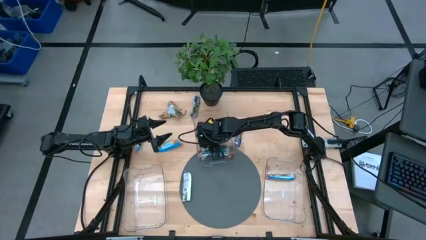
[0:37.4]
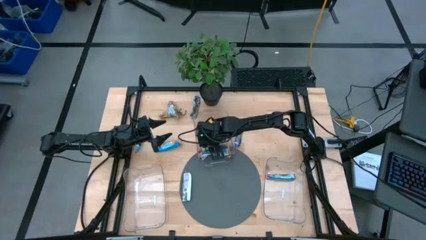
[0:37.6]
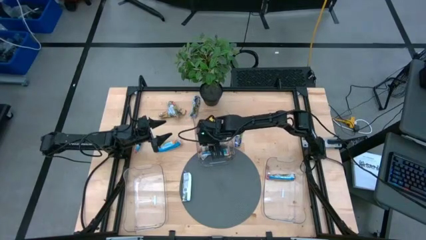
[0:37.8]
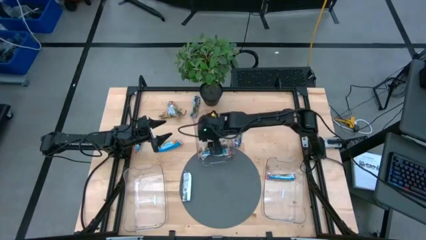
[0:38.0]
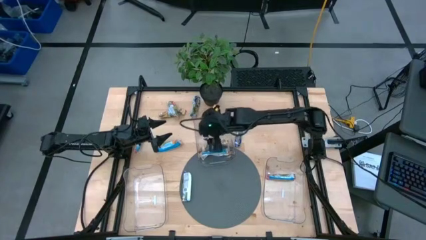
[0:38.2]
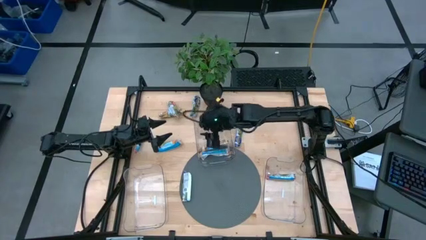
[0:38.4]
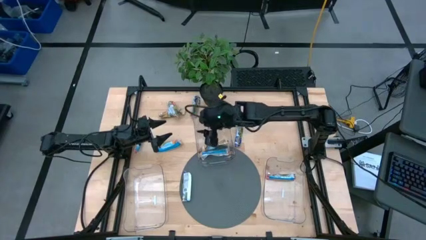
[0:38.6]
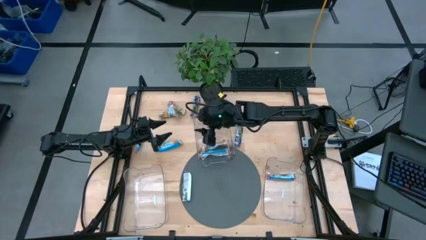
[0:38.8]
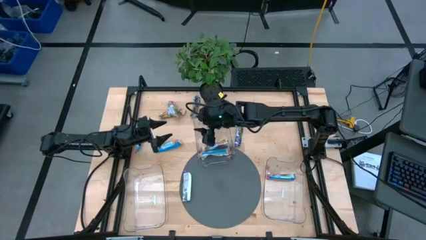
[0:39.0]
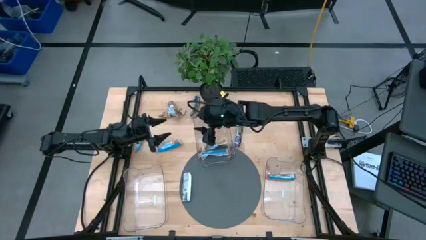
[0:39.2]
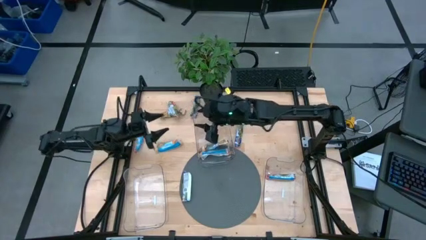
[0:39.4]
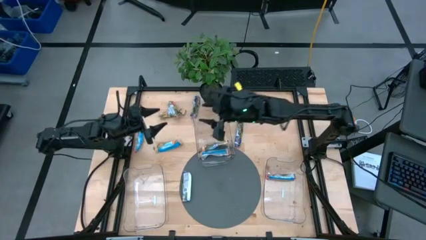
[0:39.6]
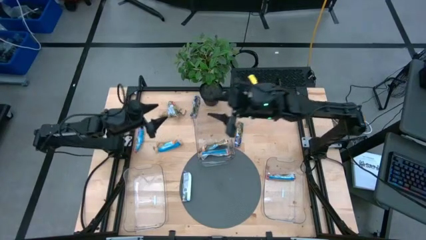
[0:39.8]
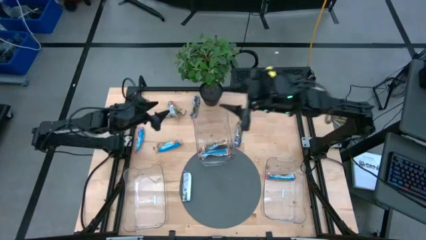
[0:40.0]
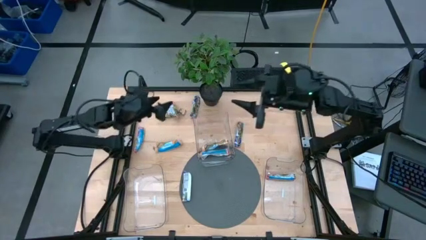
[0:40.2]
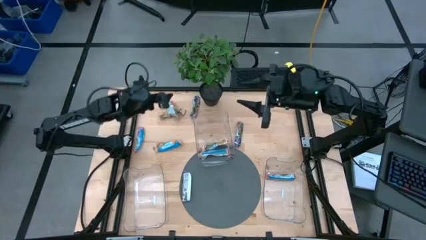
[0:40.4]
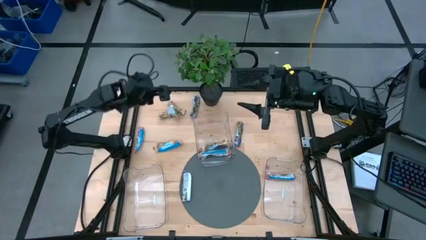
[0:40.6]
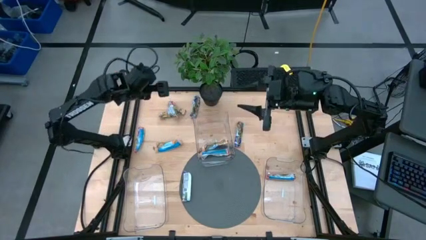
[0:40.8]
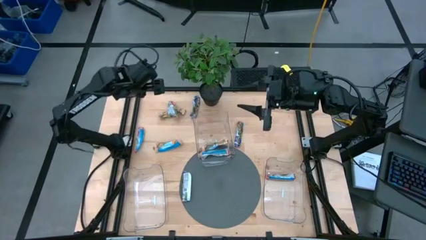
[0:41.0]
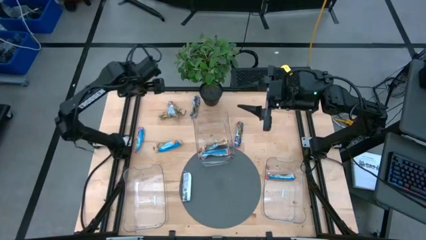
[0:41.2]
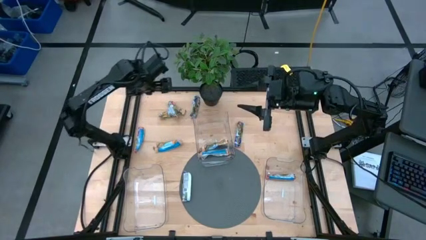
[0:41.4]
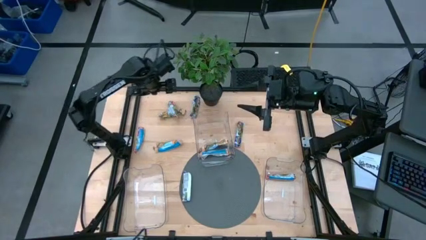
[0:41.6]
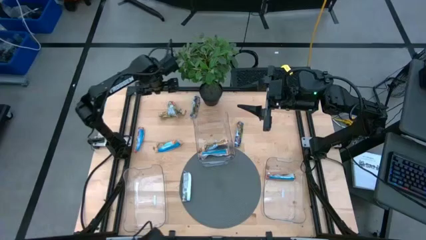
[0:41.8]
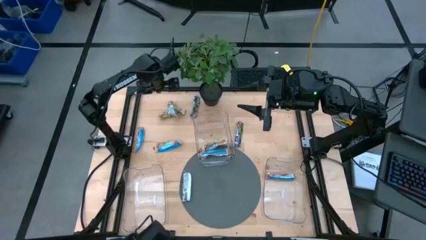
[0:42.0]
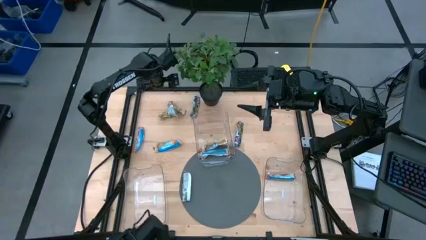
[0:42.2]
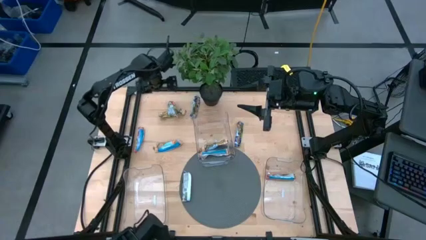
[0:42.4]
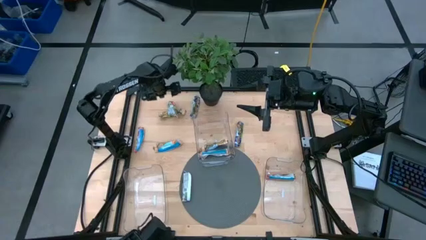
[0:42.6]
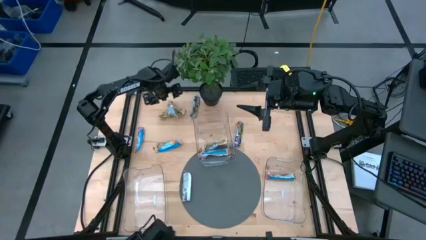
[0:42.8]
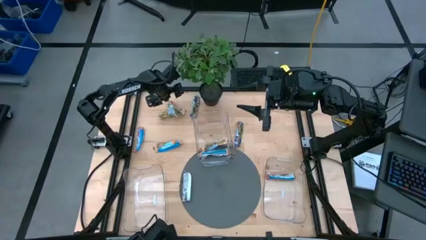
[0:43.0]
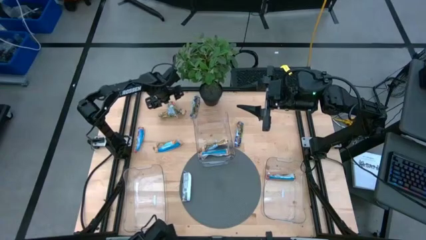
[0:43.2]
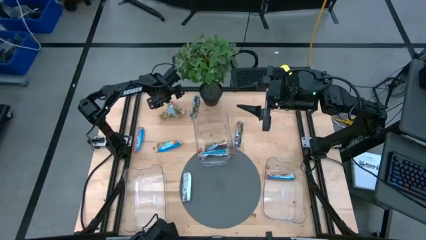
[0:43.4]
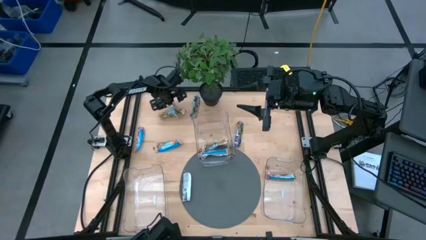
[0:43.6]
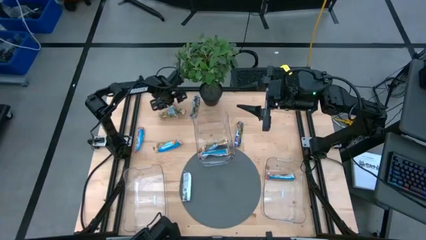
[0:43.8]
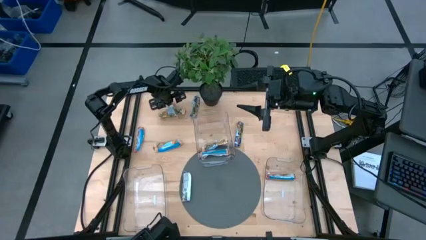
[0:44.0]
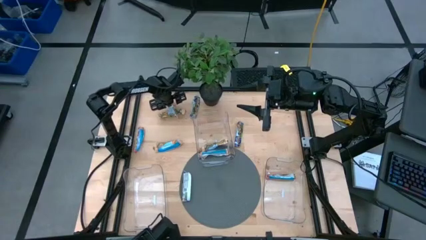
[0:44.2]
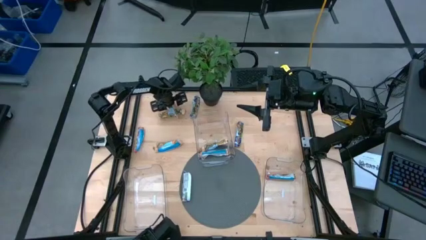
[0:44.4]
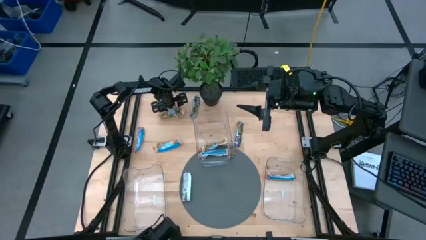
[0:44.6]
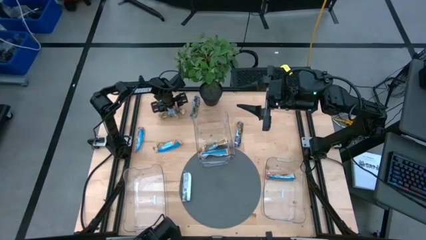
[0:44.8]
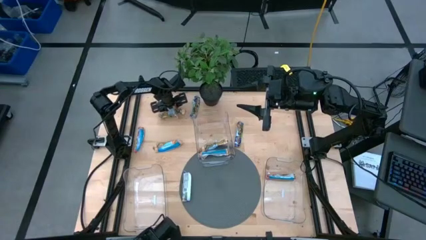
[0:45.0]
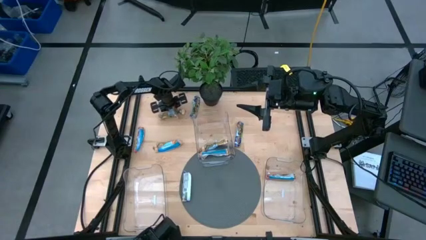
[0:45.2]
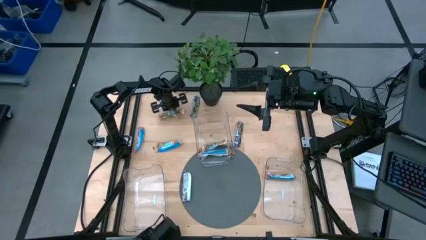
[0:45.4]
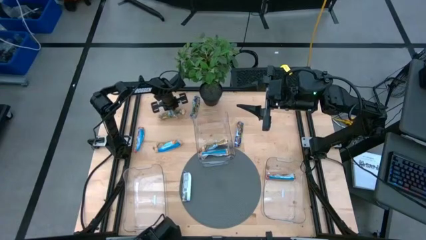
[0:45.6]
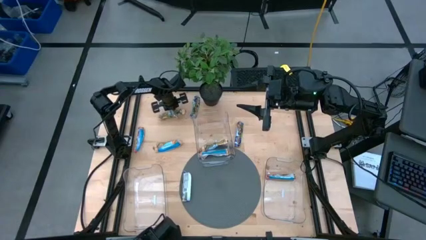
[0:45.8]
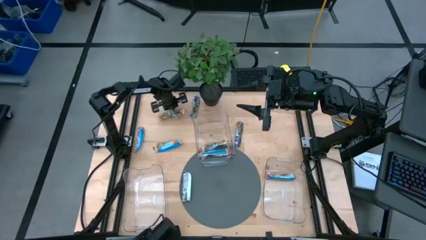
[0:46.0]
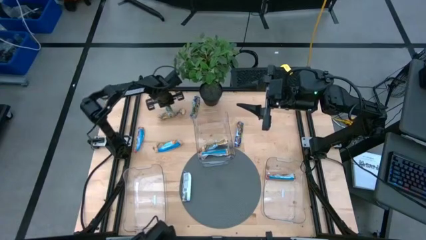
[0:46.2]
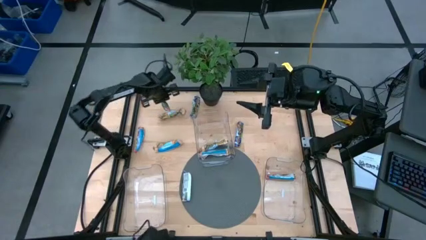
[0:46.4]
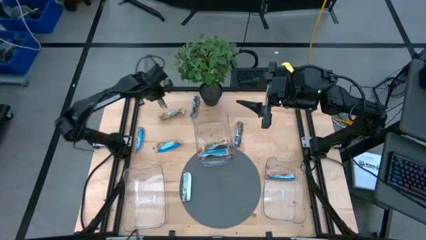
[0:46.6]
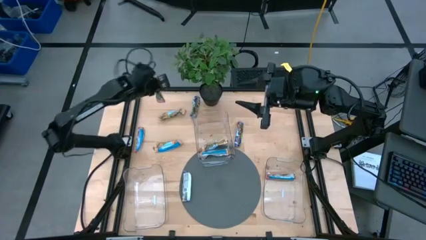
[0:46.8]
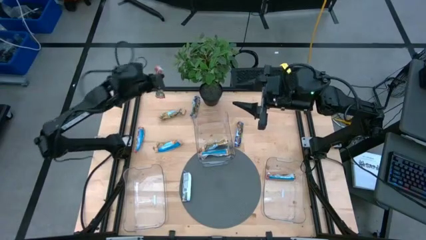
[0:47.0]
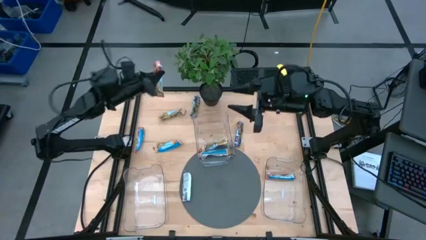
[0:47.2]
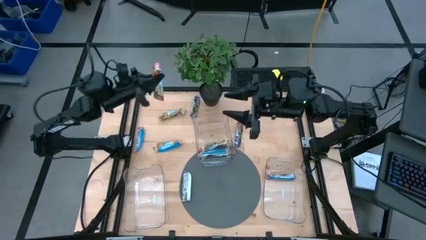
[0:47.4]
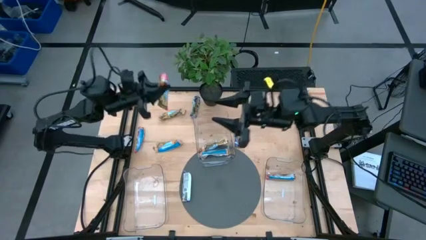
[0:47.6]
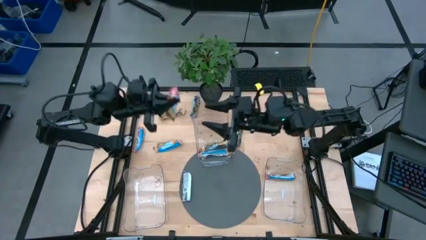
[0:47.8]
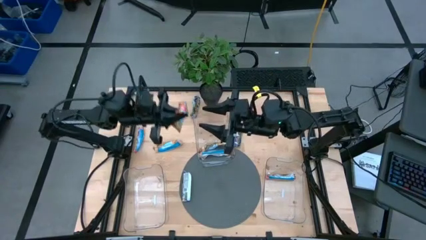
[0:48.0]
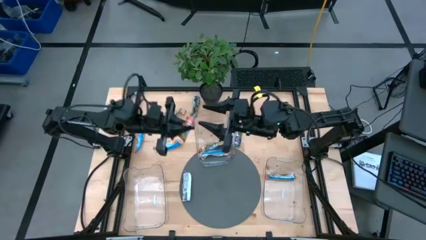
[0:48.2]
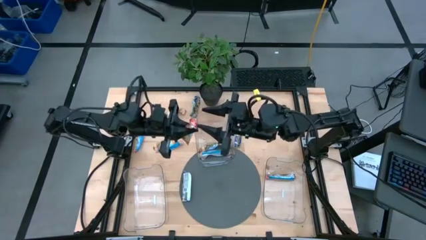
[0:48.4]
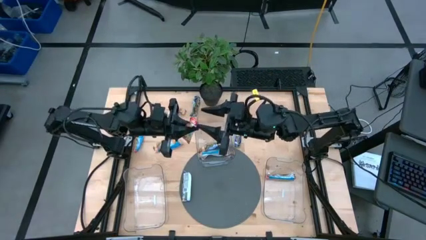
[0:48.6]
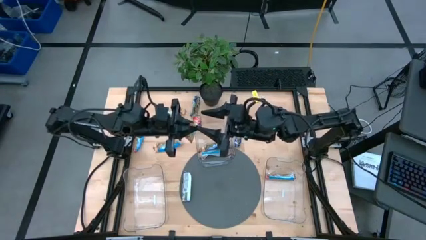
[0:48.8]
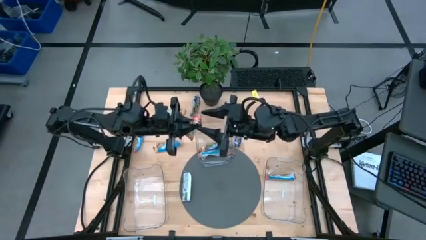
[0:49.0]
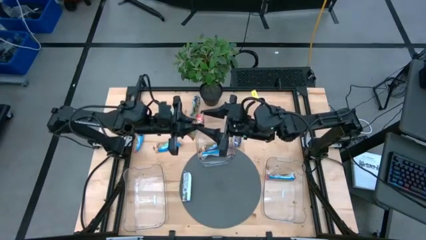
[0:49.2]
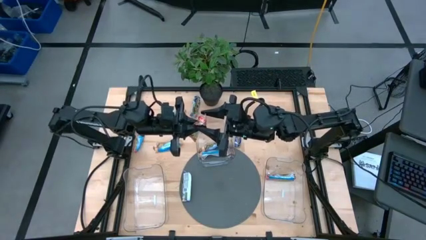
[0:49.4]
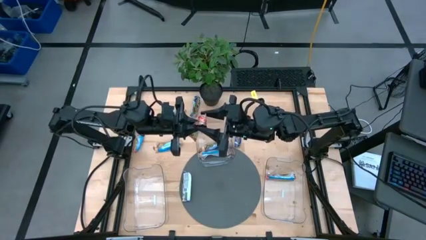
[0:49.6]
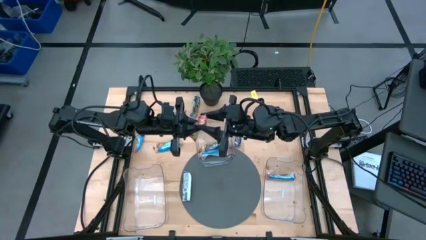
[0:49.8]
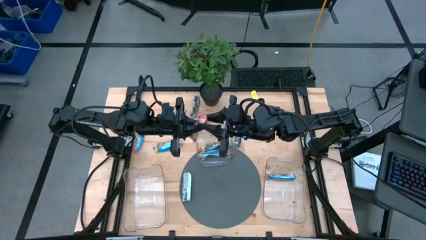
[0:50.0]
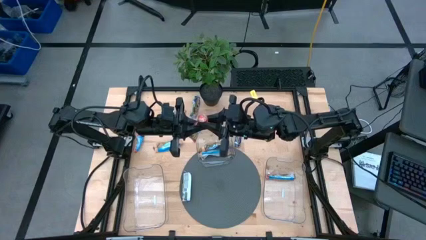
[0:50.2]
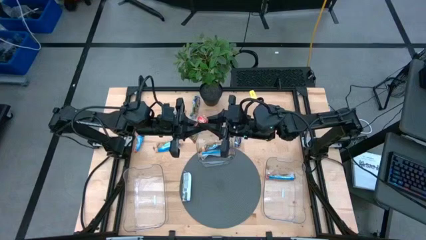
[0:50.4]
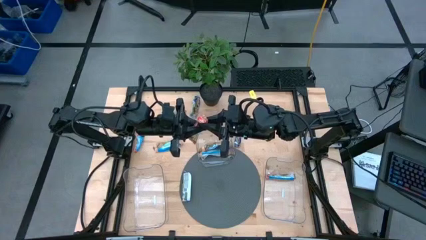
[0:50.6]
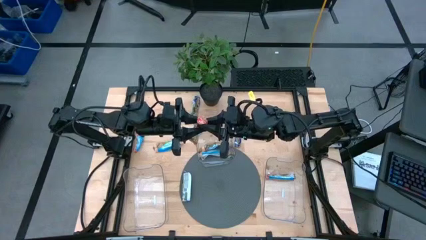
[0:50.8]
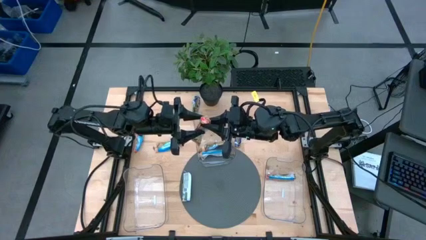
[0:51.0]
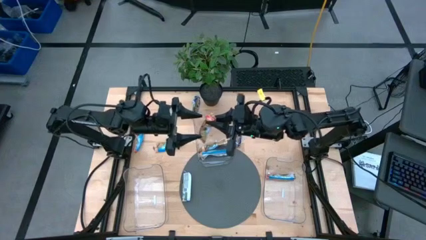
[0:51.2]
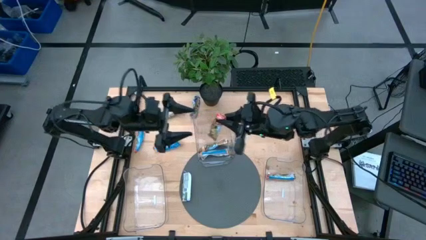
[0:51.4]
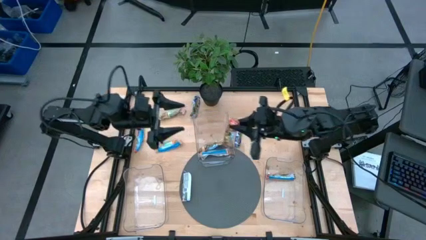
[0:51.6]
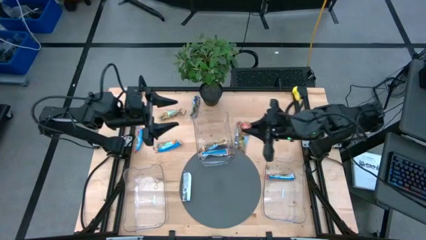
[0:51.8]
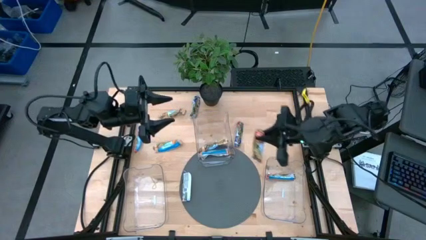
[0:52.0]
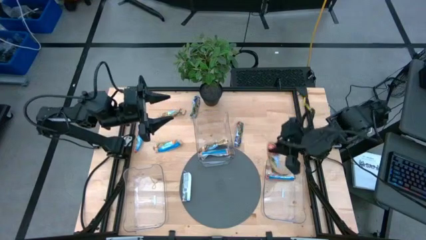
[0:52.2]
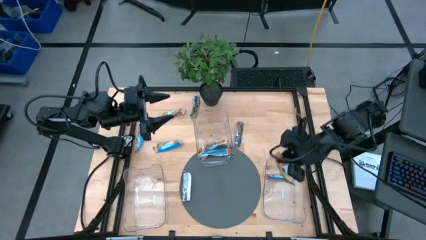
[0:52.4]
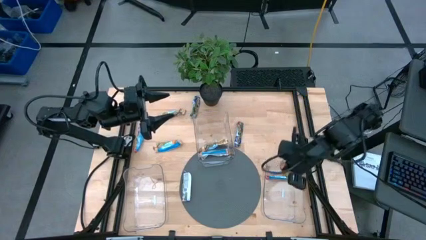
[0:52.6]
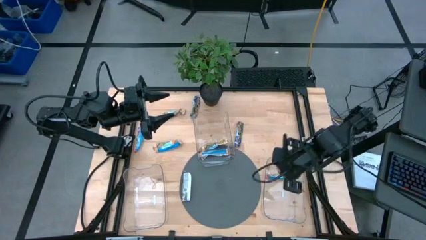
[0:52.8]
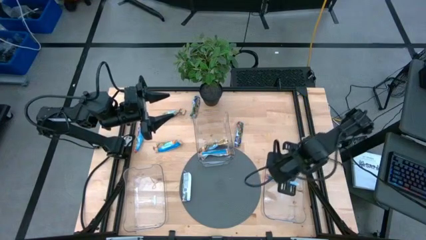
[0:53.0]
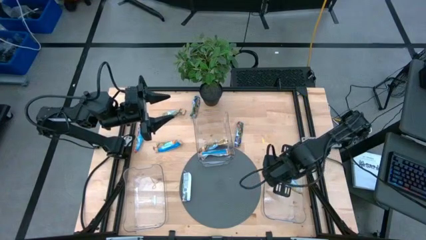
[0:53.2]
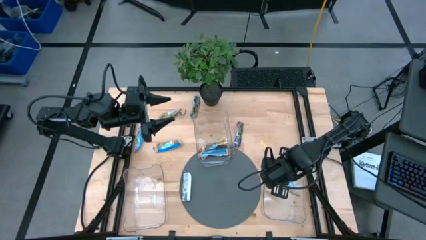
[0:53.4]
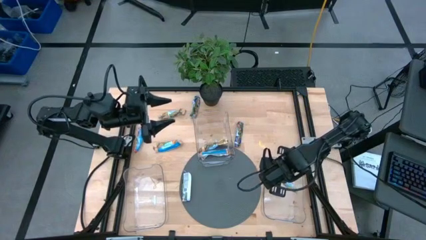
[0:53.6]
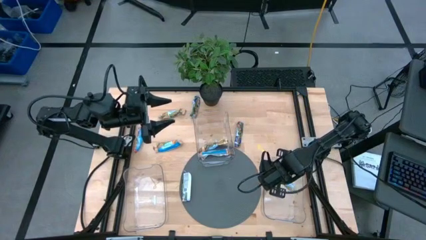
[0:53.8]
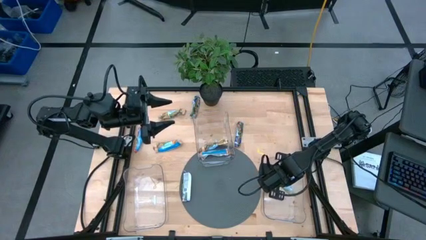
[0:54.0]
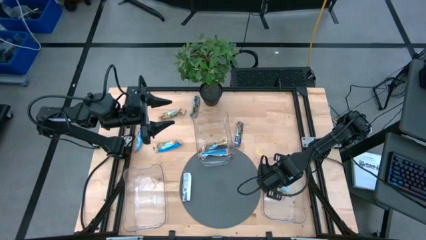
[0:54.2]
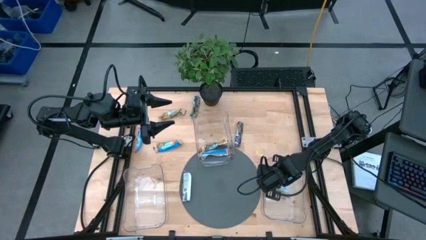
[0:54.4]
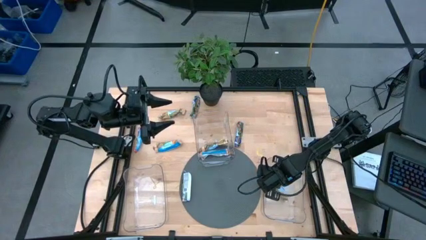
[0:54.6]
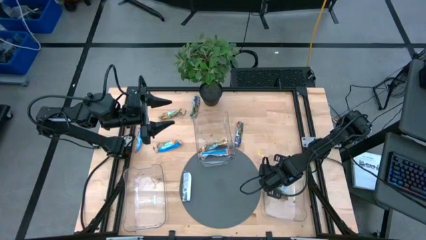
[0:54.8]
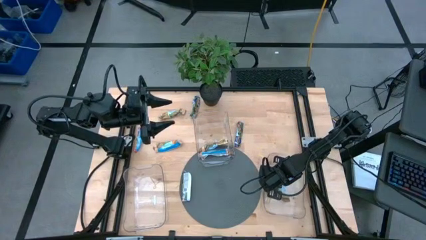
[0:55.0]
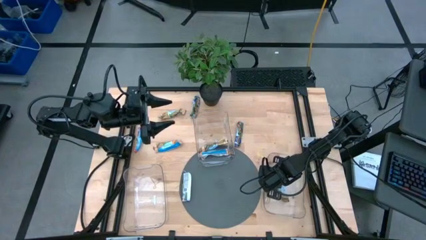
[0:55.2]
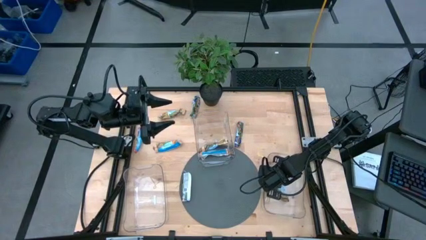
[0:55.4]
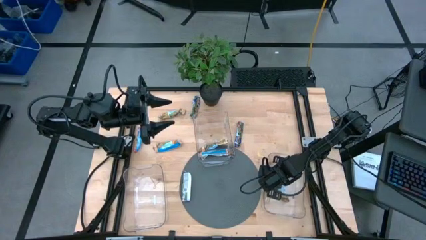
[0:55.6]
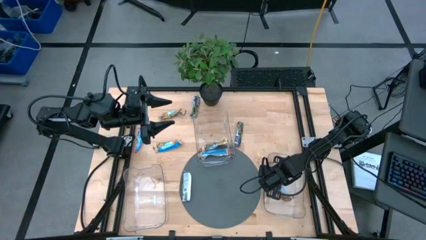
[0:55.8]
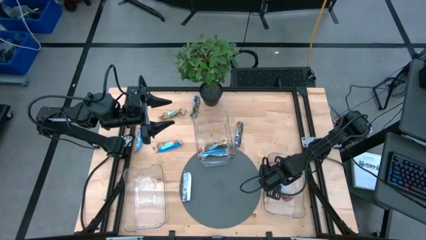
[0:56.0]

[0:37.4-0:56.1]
Task: Pick and place Granola Bars by type
Put the top red granola bar into the right transparent bin
